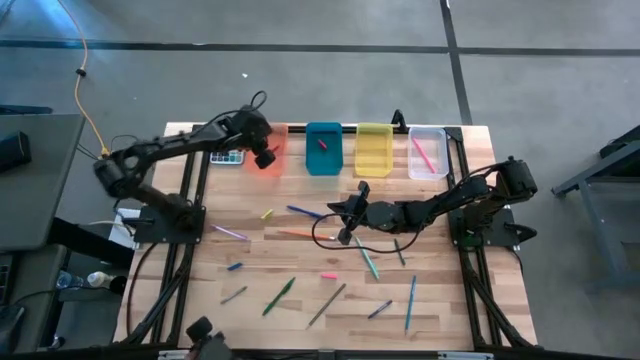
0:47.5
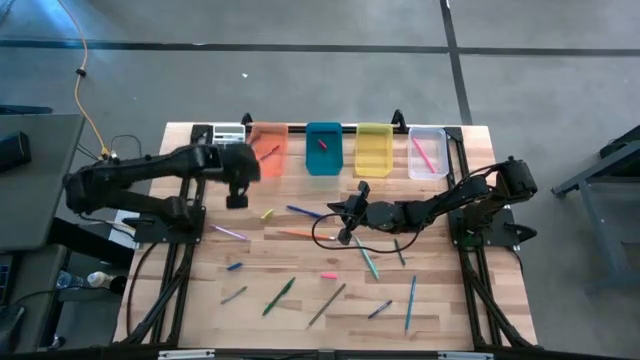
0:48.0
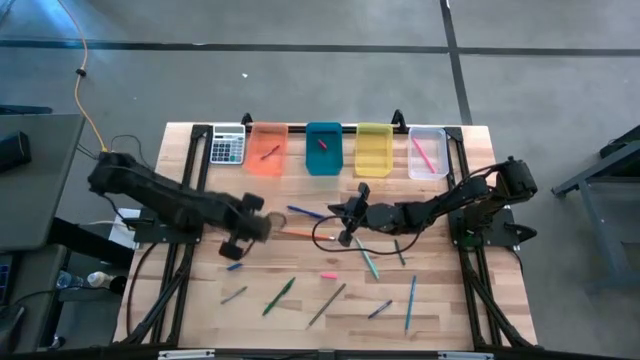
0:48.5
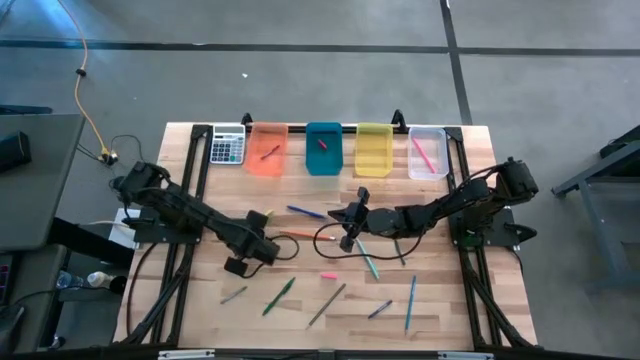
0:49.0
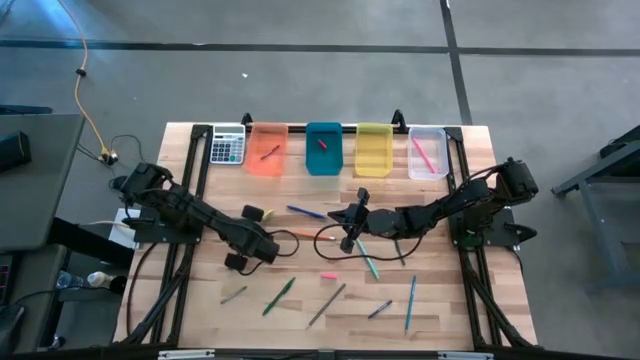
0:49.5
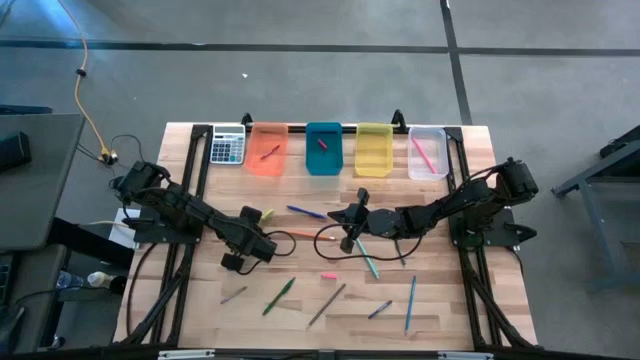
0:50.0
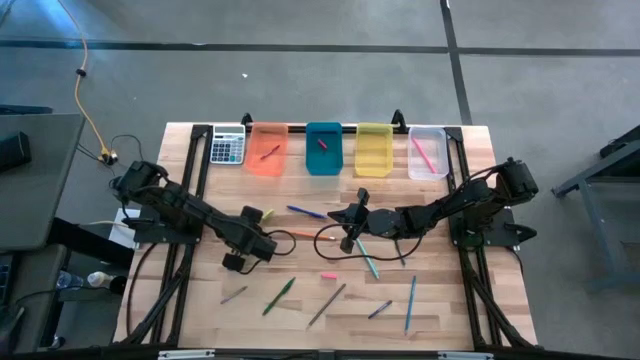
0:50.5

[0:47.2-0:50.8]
Task: Sort crayons/erasers/pens/pencils in bins
Put the purple ballpen into the yellow bin

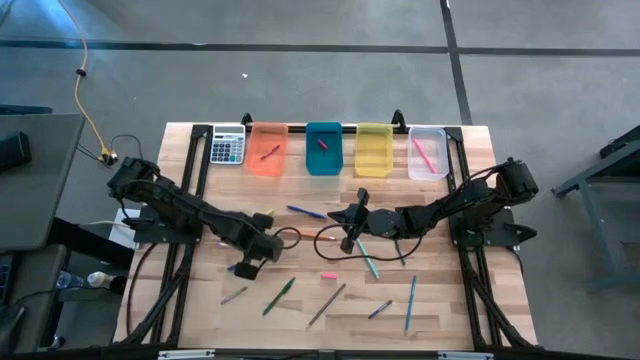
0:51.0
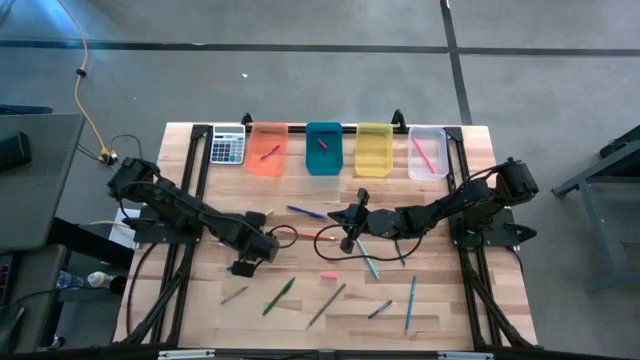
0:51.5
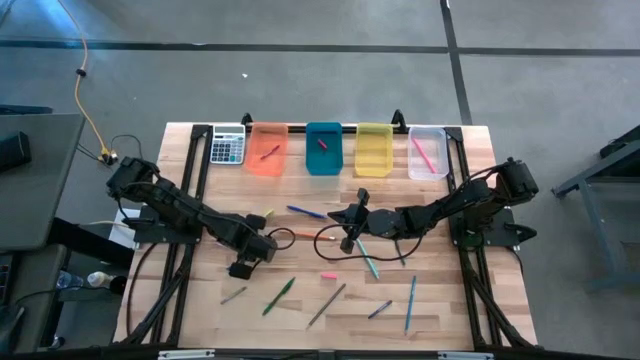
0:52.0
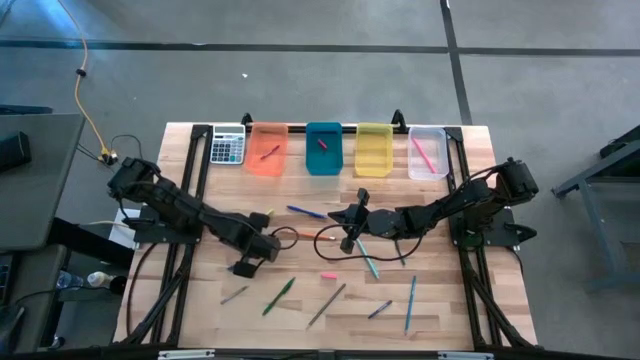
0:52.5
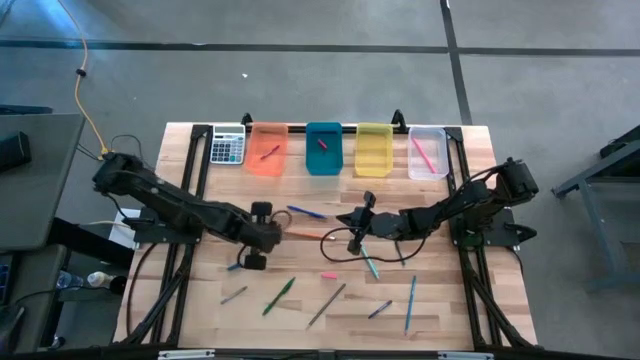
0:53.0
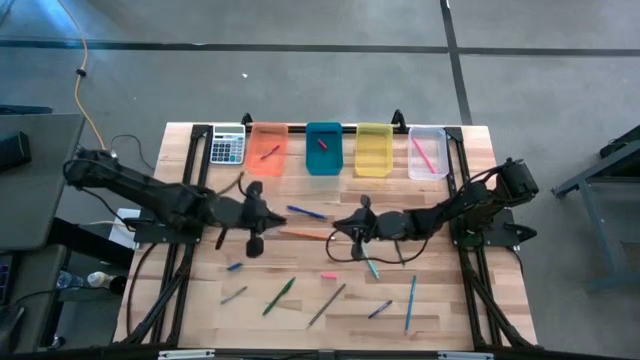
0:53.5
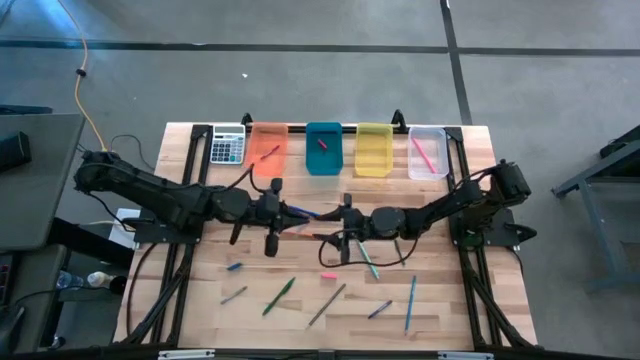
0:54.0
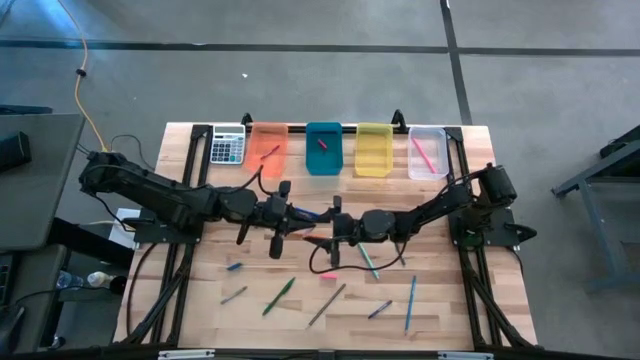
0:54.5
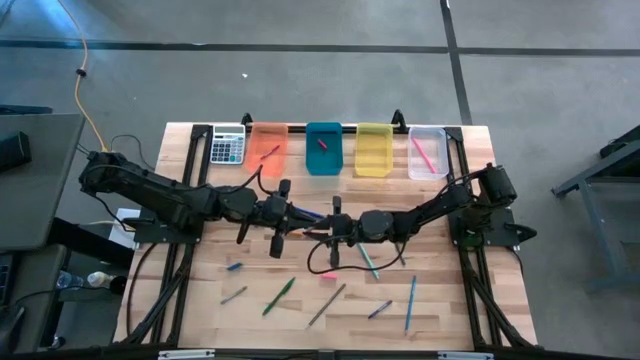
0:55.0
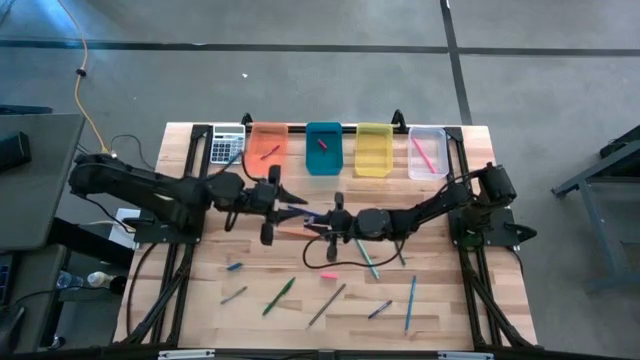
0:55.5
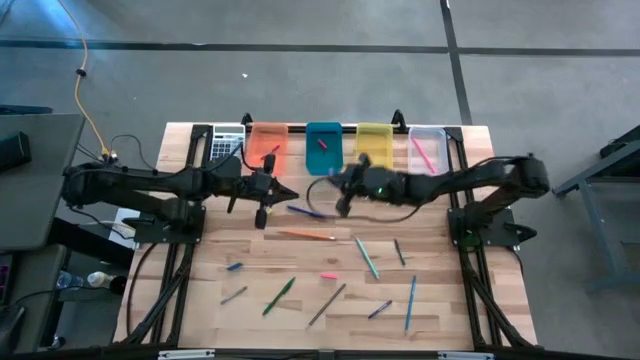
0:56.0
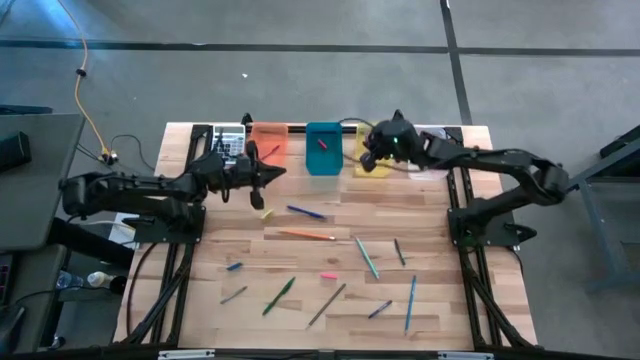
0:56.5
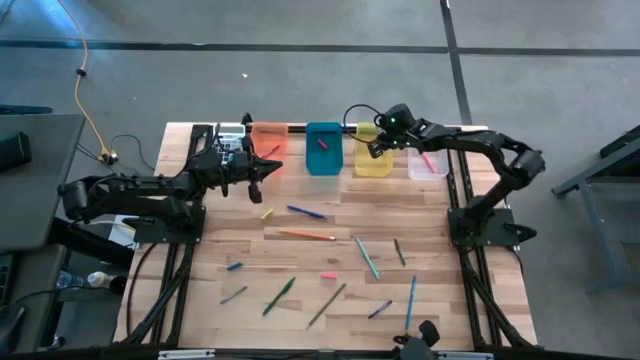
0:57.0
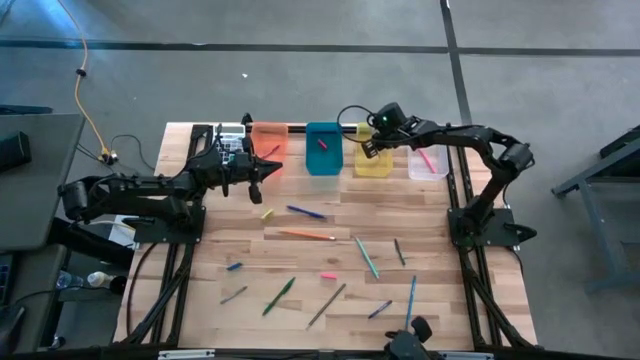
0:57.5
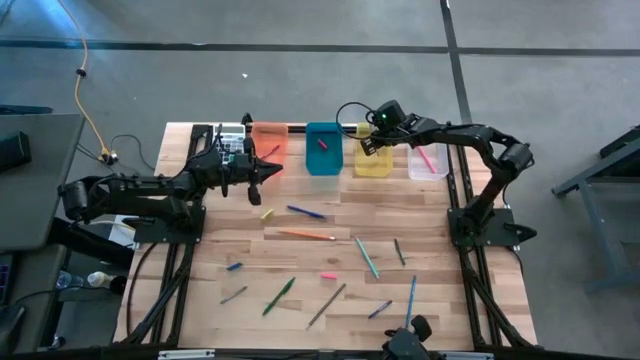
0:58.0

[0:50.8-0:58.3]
Put the purple ballpen into the yellow bin

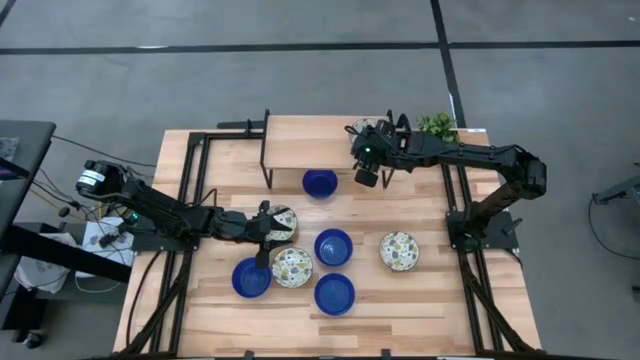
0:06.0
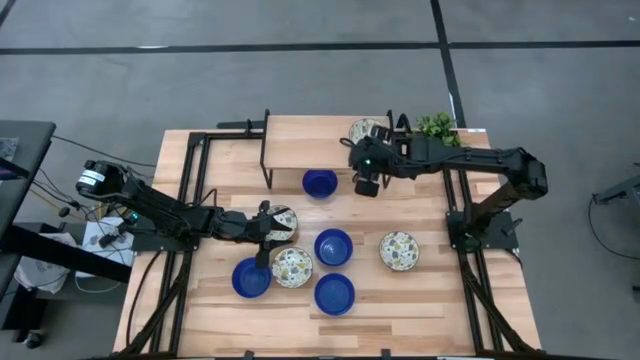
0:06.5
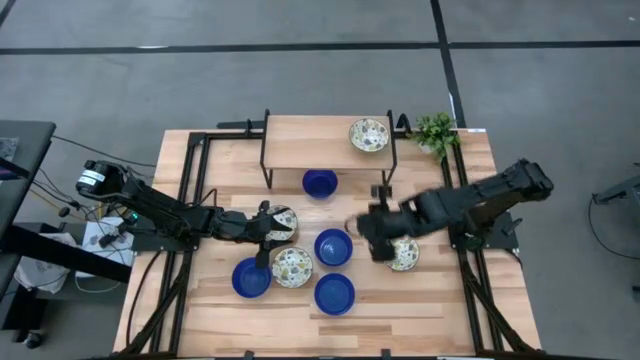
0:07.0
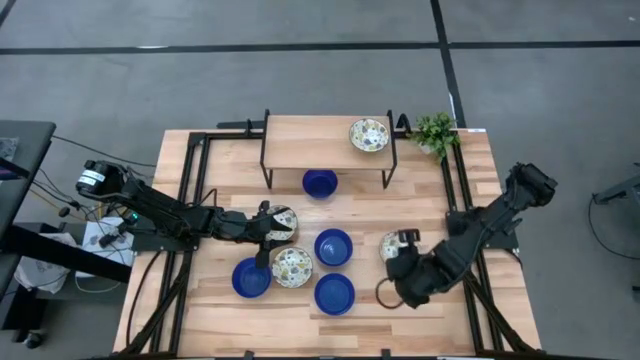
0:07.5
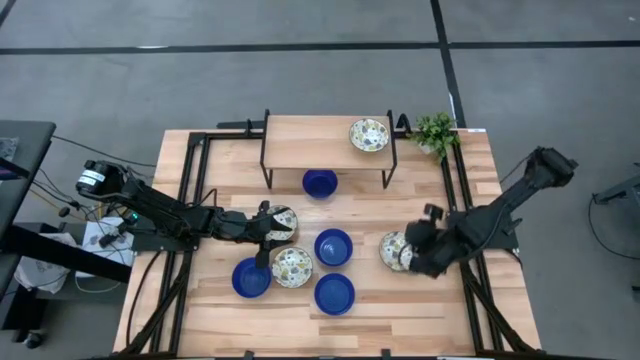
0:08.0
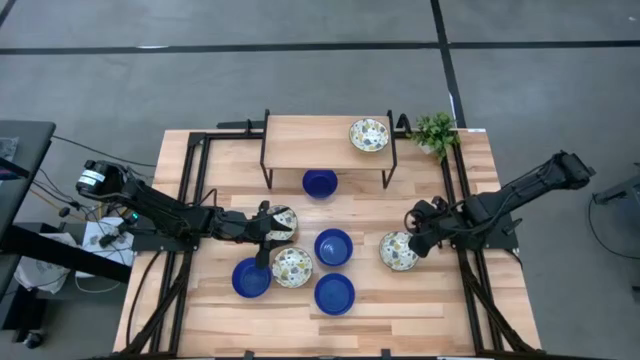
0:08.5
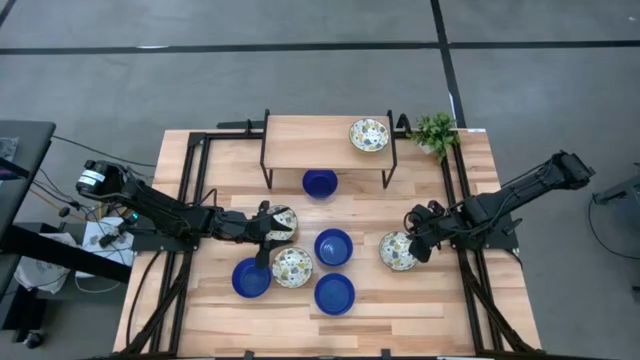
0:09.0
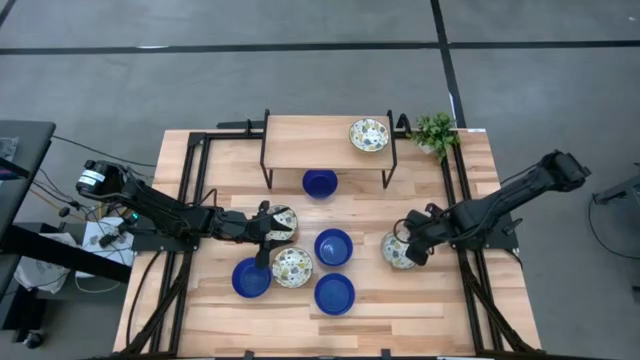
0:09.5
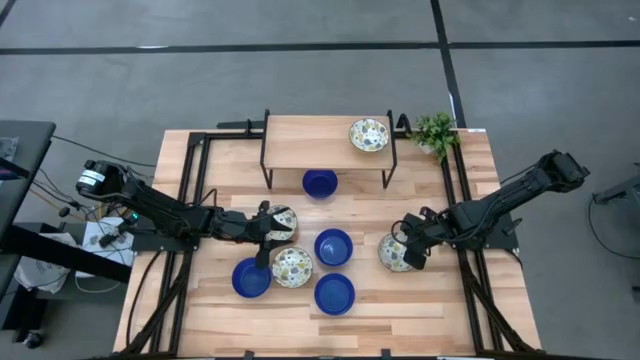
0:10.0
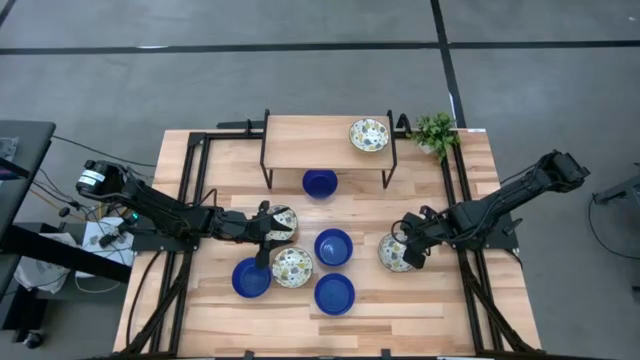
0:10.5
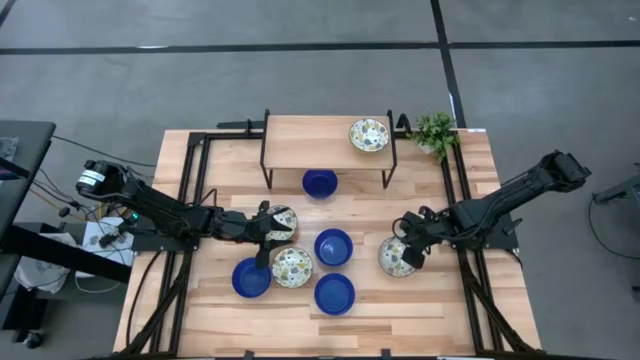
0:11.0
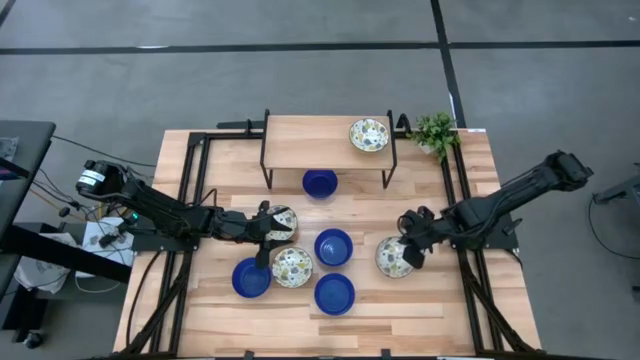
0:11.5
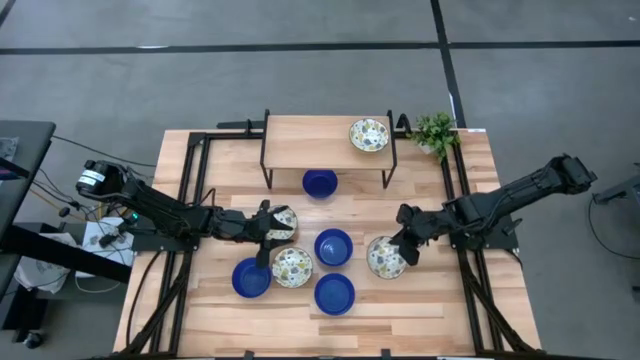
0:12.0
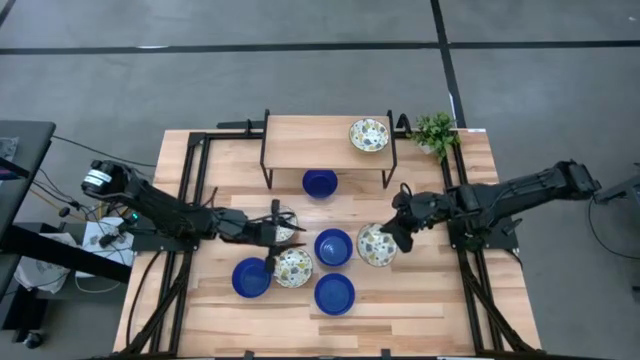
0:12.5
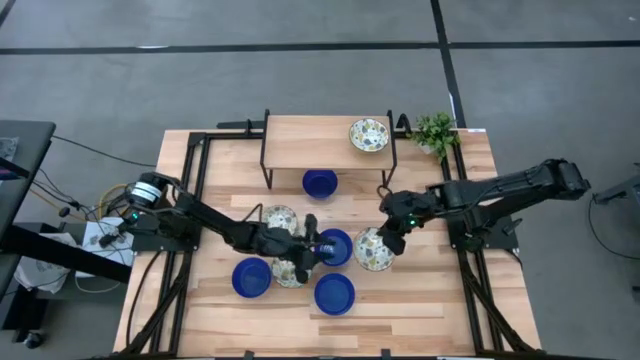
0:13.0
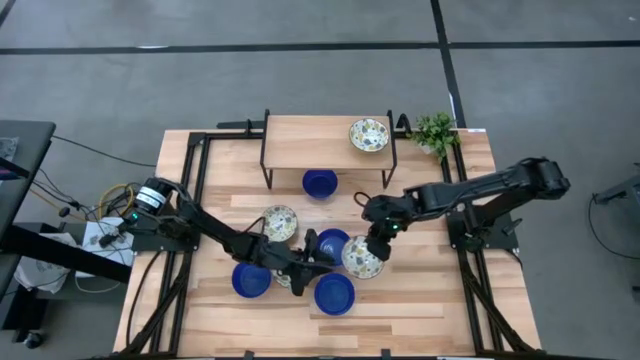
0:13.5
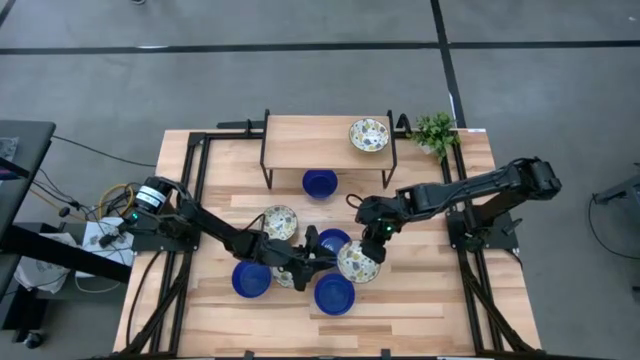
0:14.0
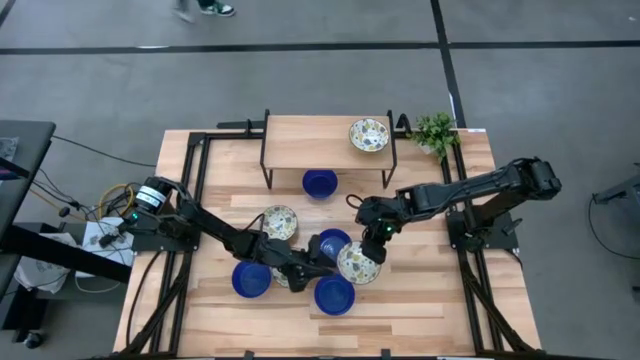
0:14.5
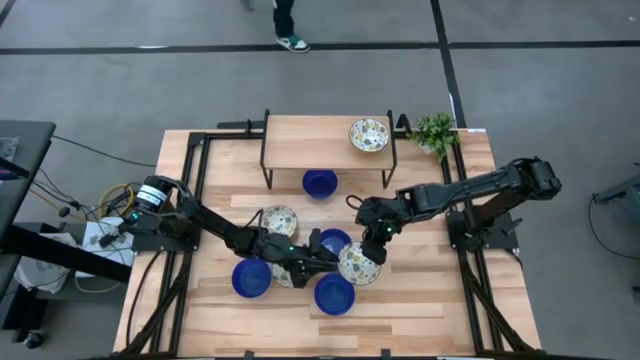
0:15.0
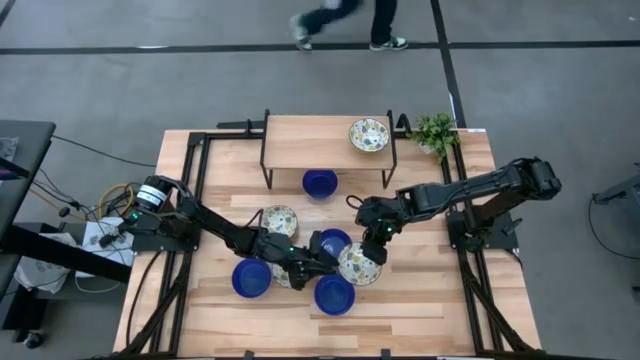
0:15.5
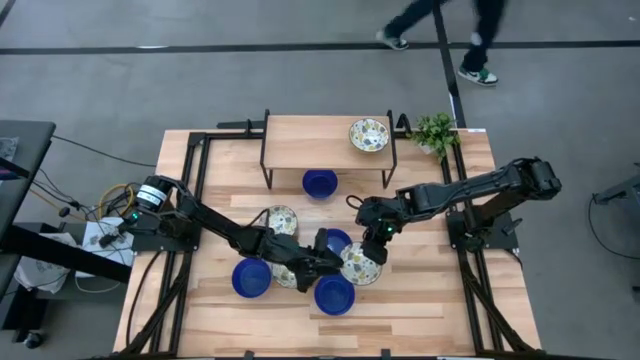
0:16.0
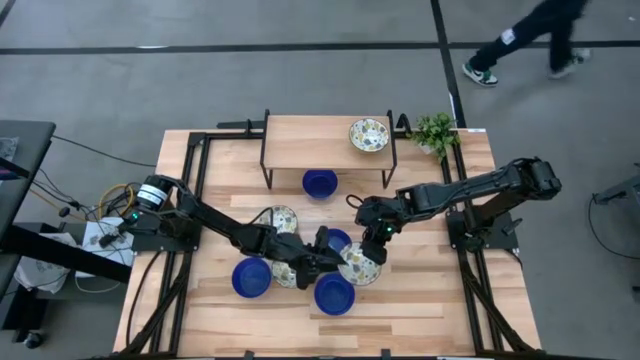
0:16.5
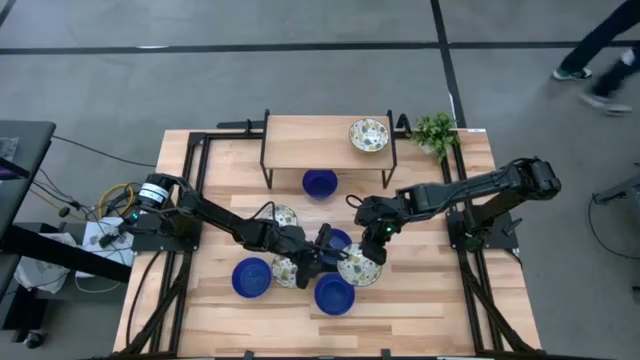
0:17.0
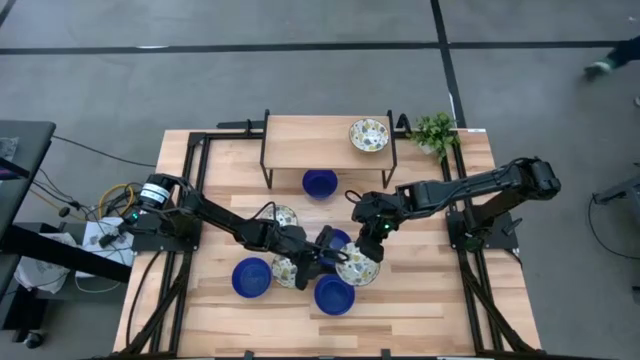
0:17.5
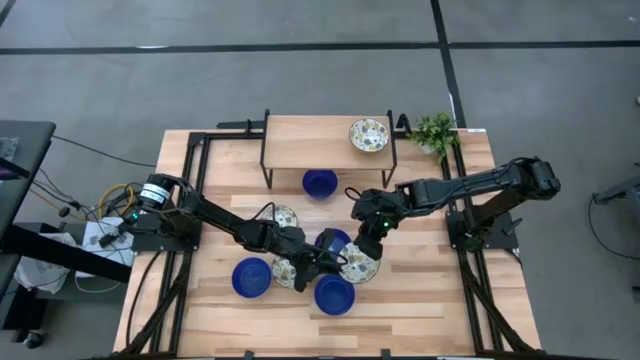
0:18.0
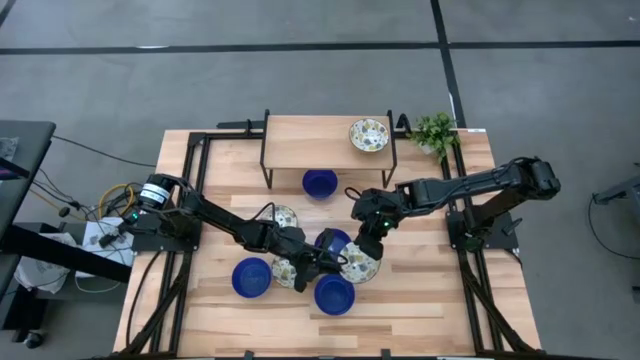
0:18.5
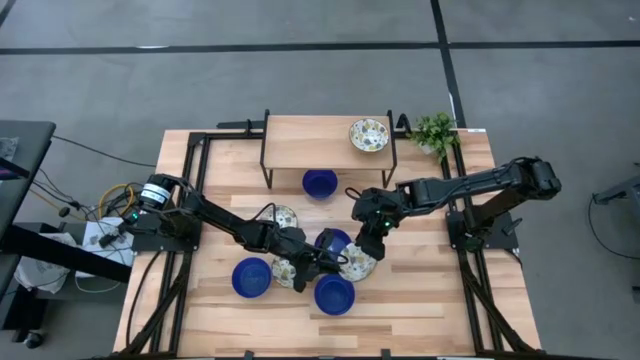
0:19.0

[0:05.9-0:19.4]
Task: Pick & Place Mini bowls
Stack the white patterned bowl on the white patterned bowl on the shelf
